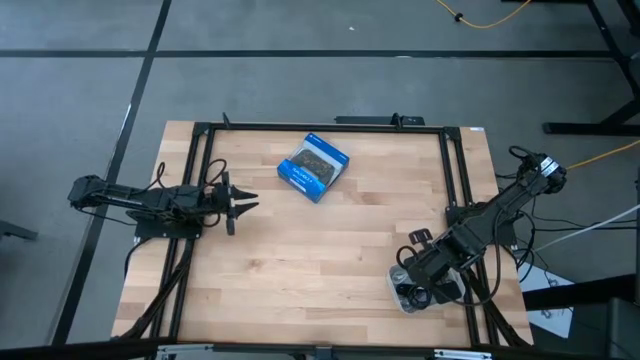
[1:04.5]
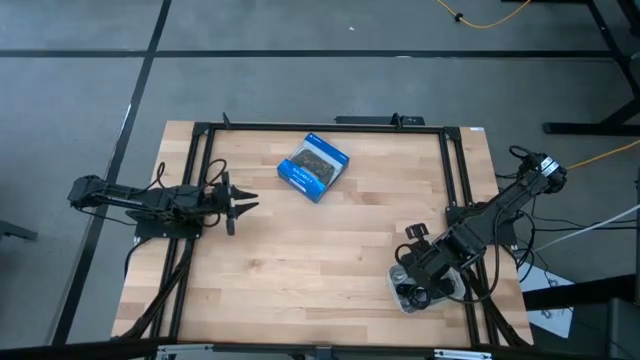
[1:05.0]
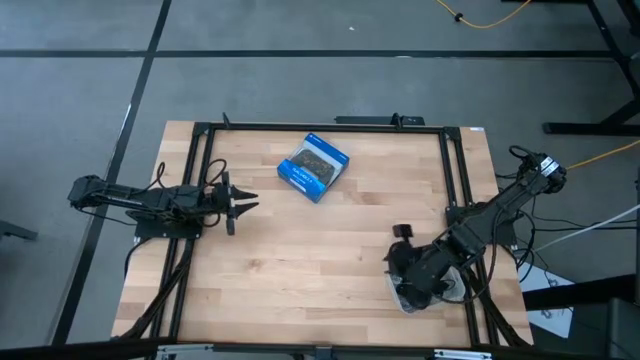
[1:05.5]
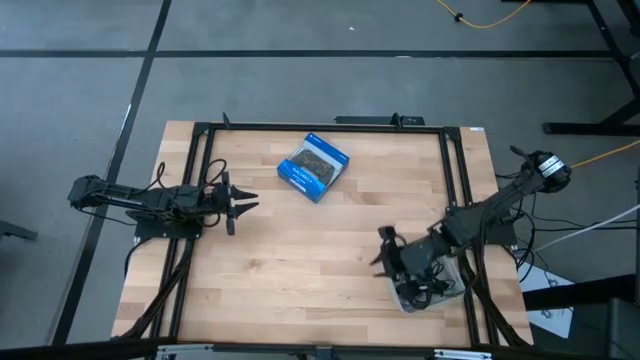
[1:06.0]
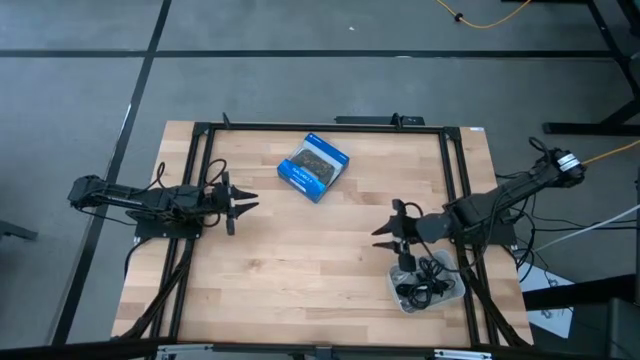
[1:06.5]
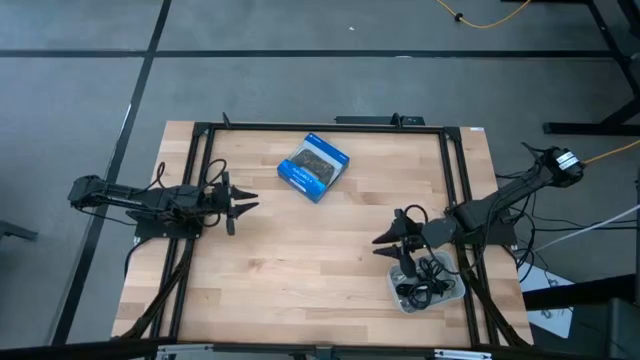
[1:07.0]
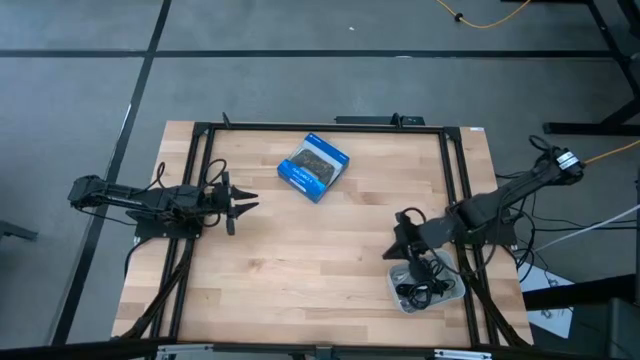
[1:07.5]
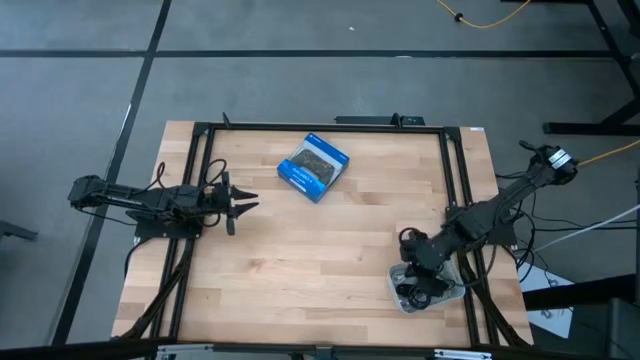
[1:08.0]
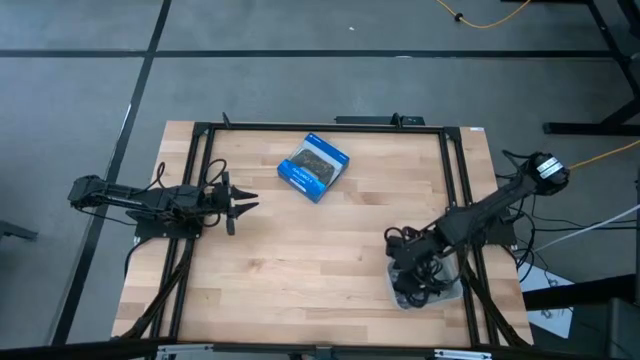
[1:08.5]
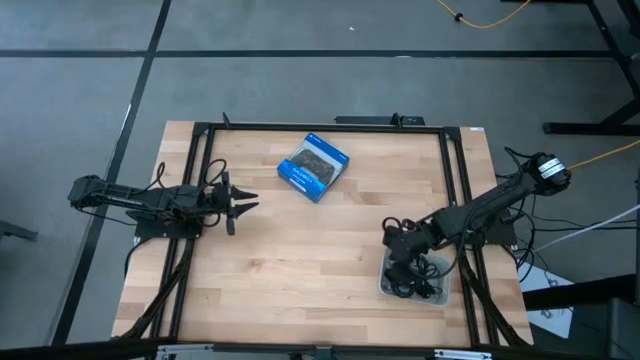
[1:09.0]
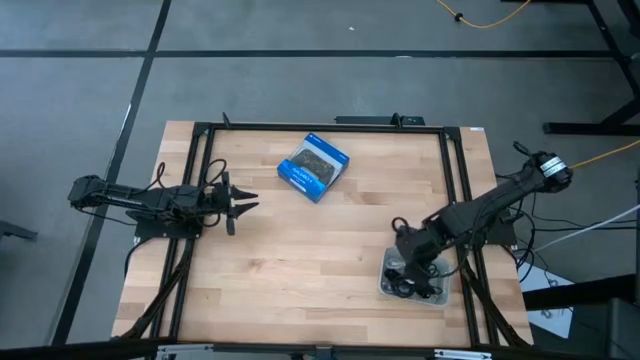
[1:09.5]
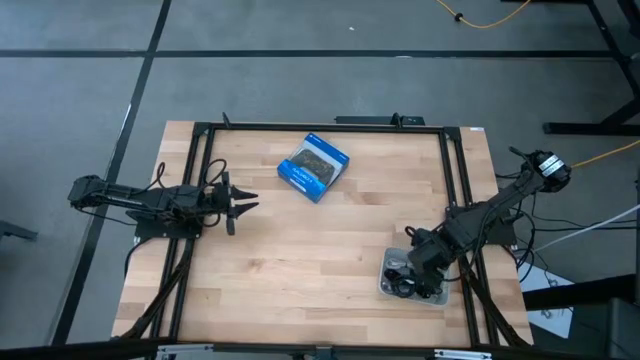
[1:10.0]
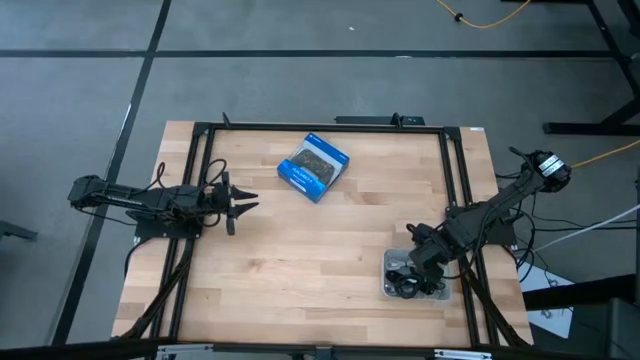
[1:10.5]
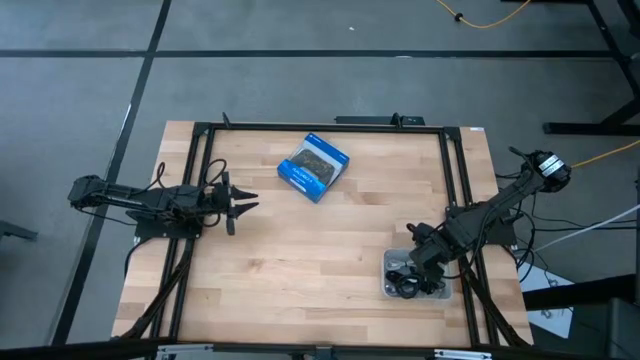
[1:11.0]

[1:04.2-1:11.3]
Task: Pick and place USB-C Cables
Adjust the gray bin

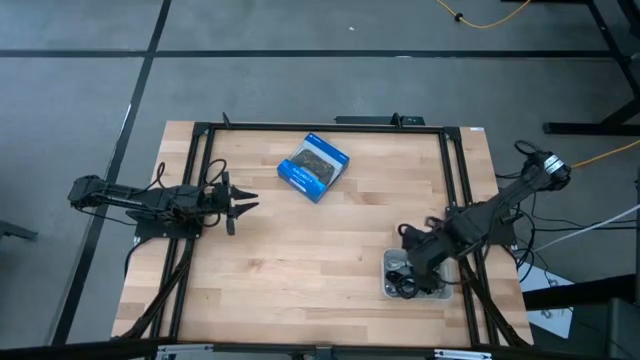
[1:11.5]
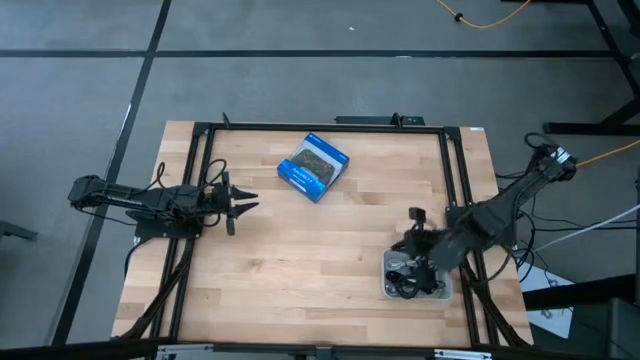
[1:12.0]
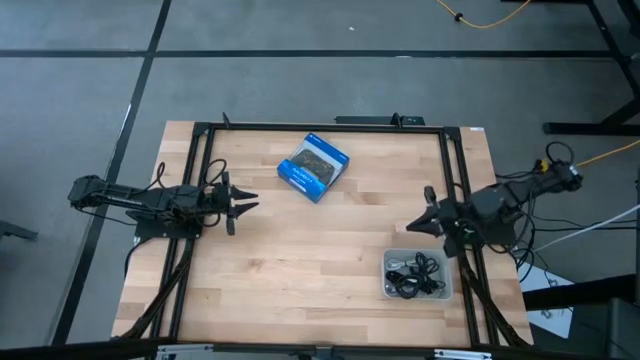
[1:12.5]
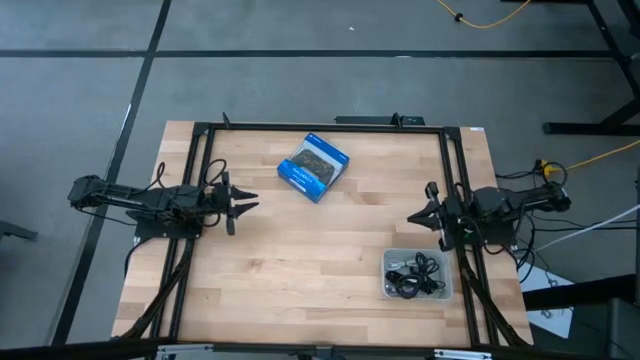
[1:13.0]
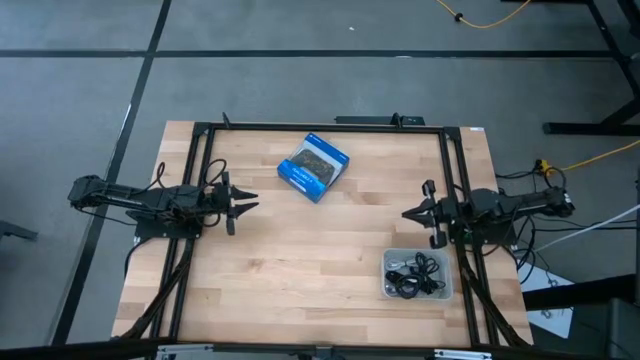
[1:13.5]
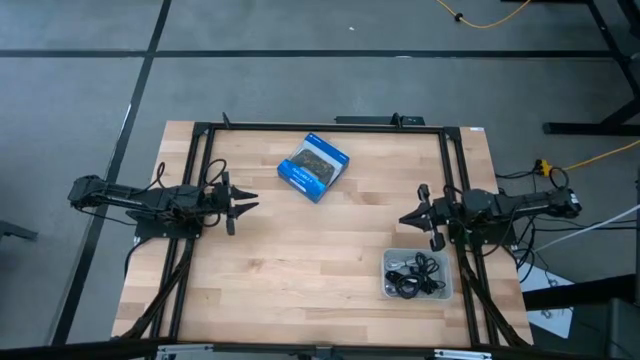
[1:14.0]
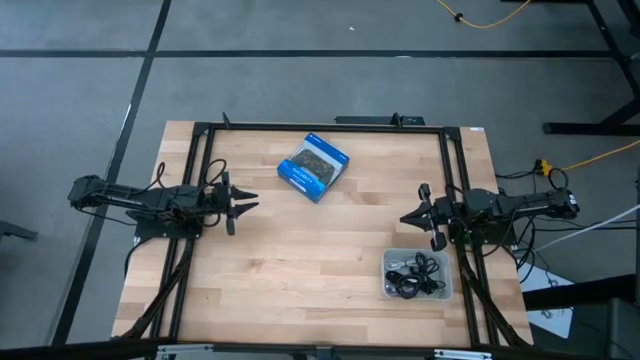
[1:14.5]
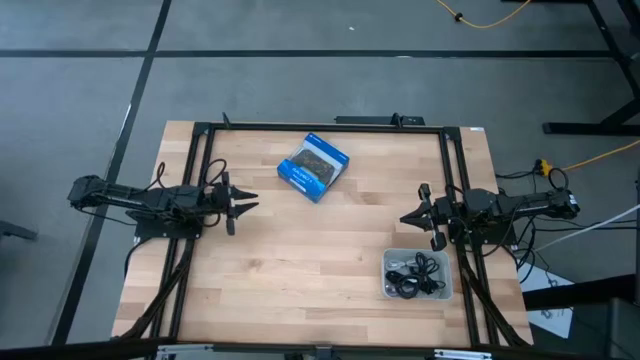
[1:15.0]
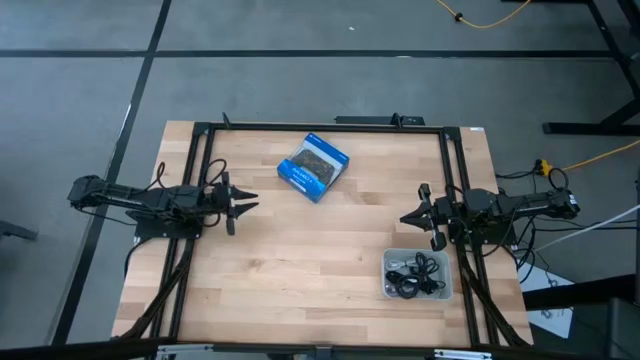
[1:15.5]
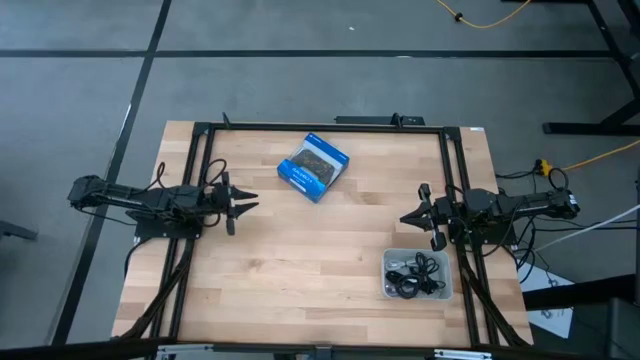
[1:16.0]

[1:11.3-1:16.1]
Return to Home Position

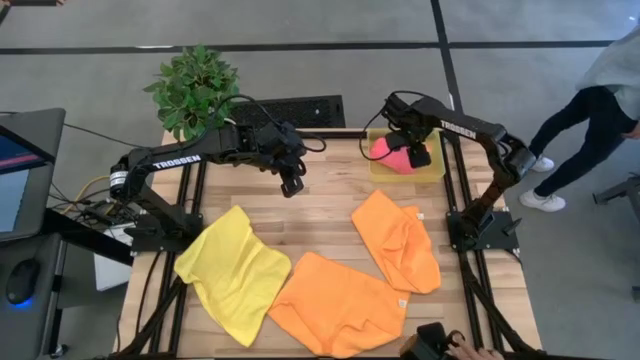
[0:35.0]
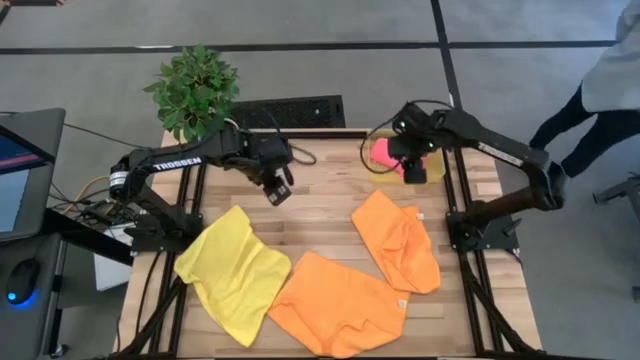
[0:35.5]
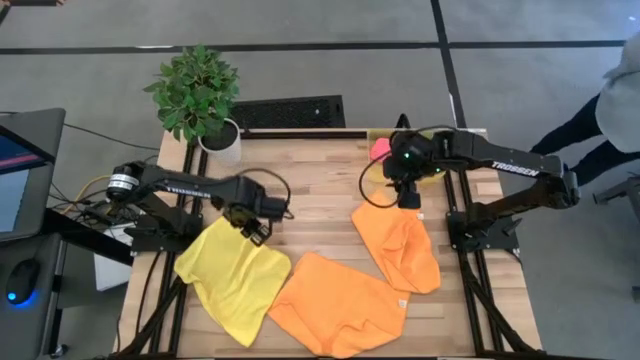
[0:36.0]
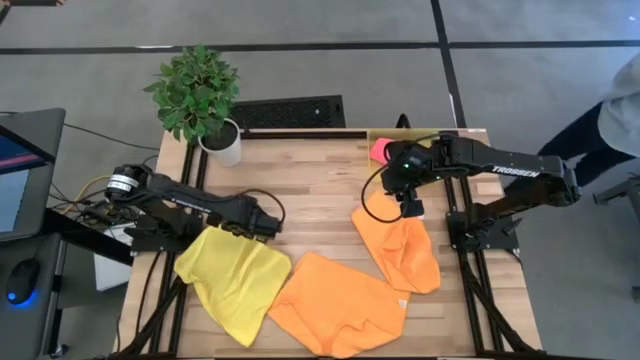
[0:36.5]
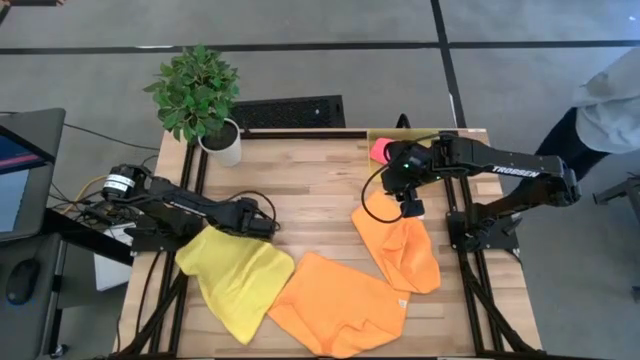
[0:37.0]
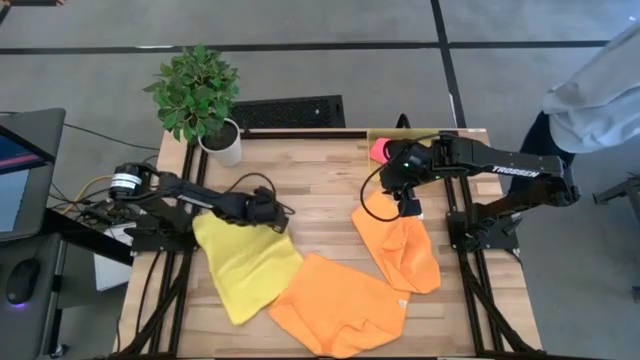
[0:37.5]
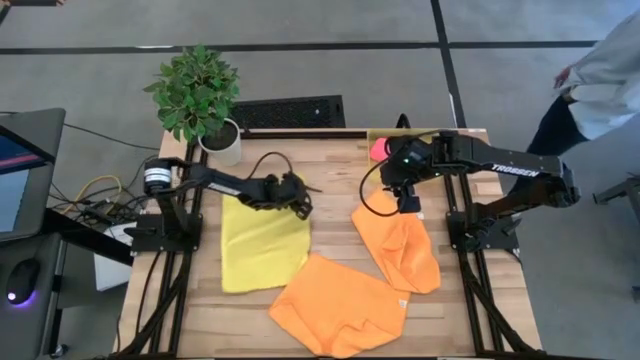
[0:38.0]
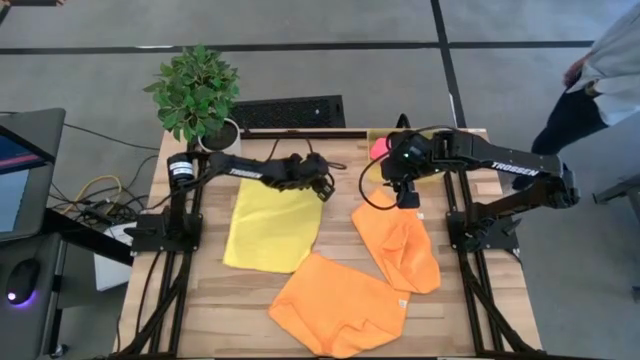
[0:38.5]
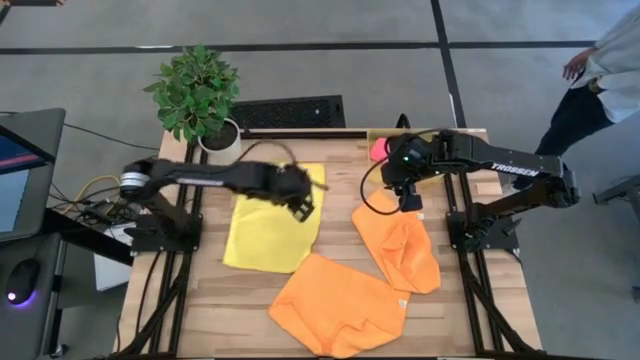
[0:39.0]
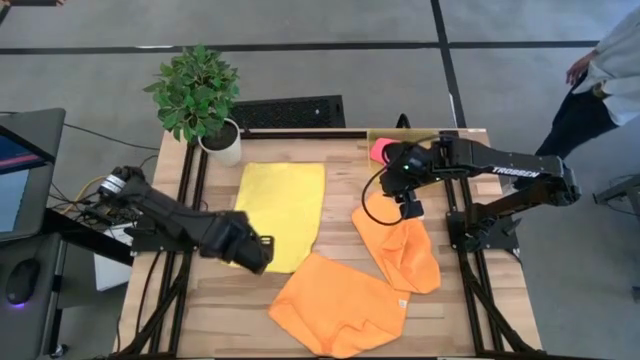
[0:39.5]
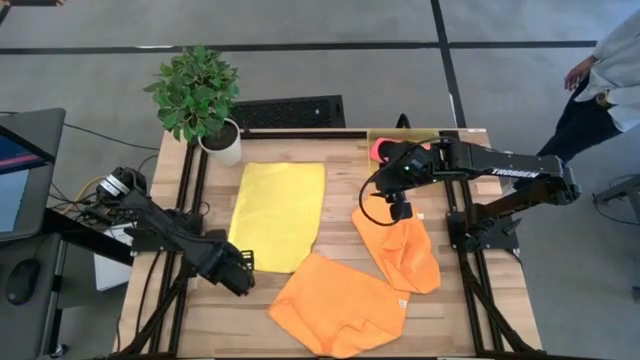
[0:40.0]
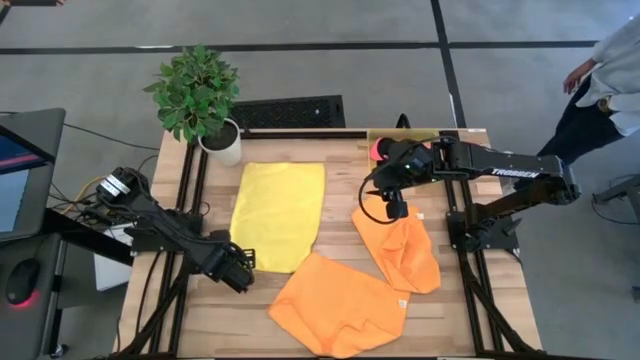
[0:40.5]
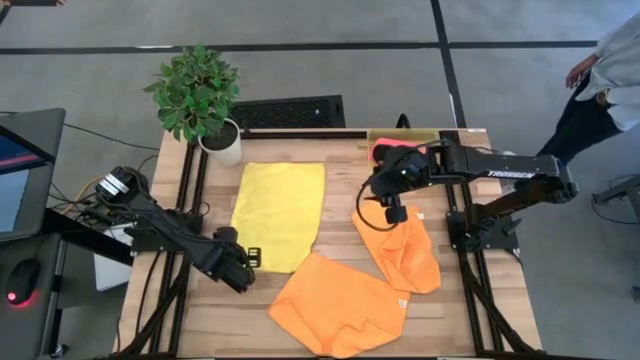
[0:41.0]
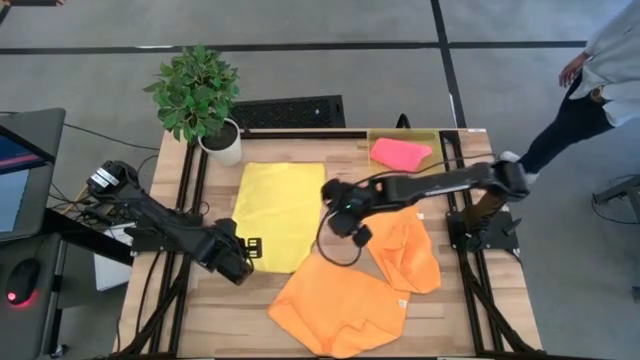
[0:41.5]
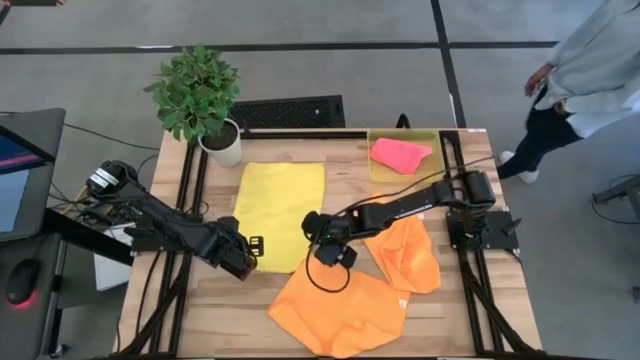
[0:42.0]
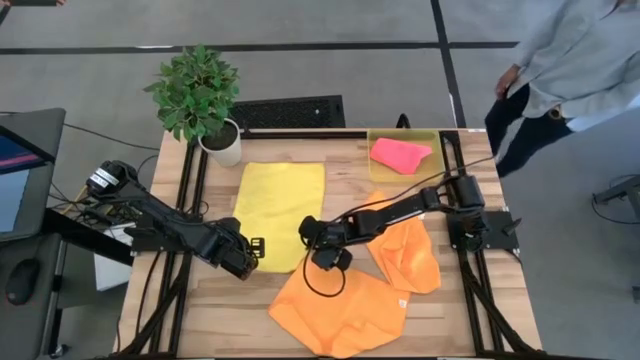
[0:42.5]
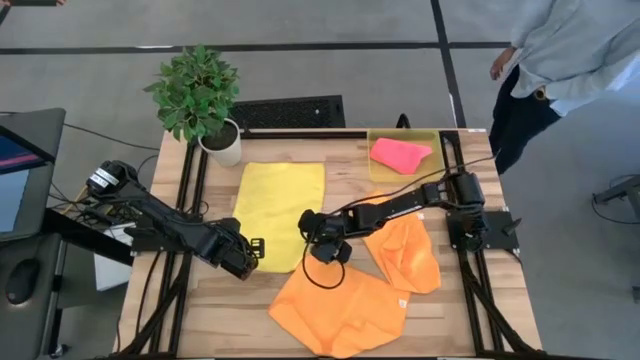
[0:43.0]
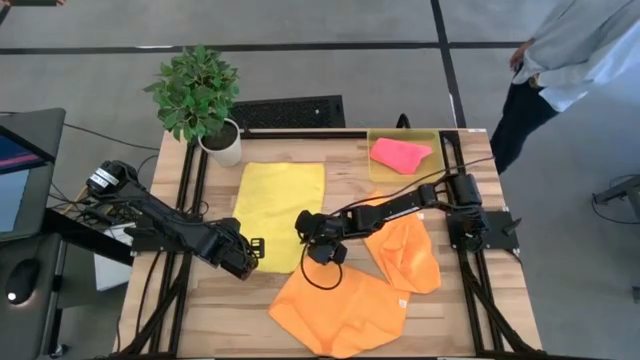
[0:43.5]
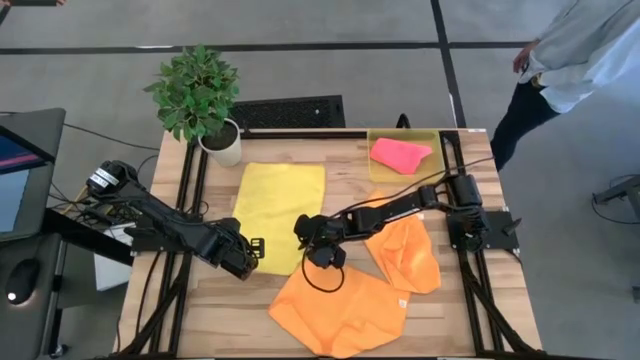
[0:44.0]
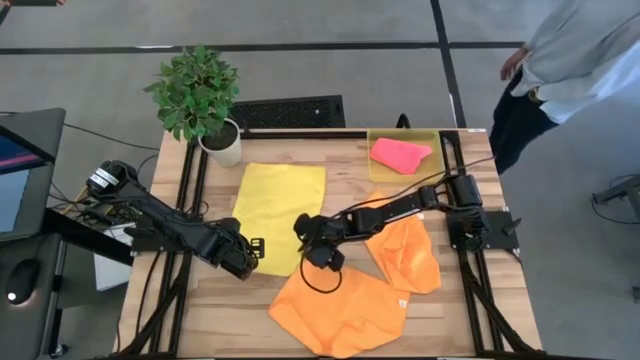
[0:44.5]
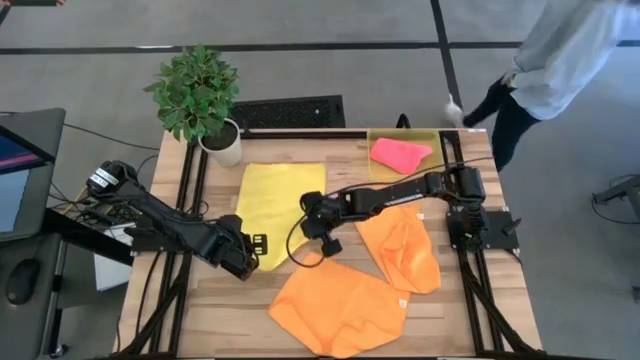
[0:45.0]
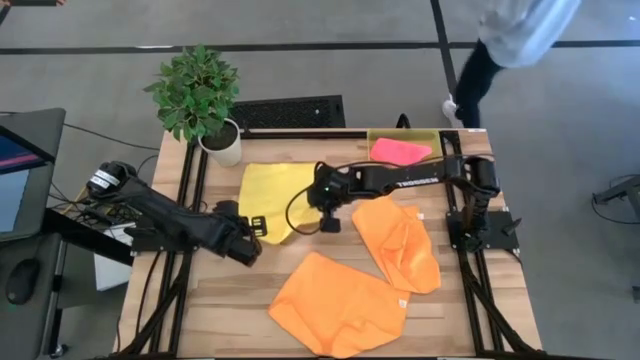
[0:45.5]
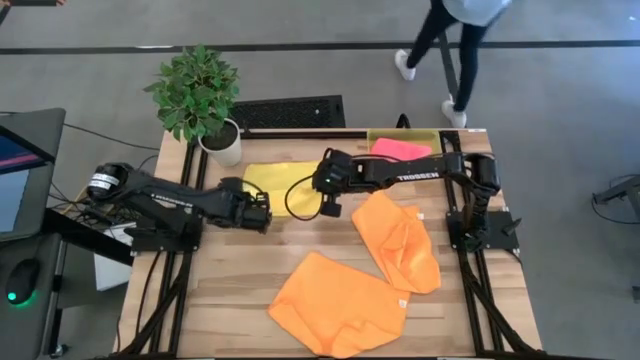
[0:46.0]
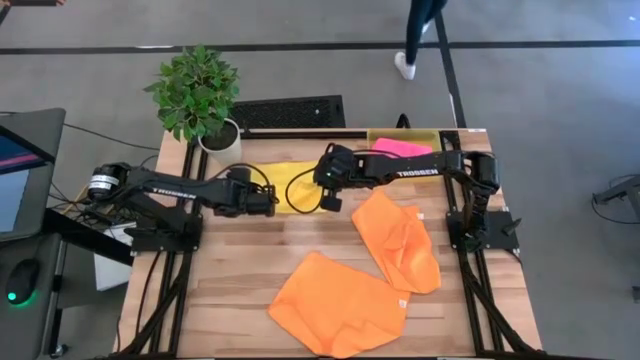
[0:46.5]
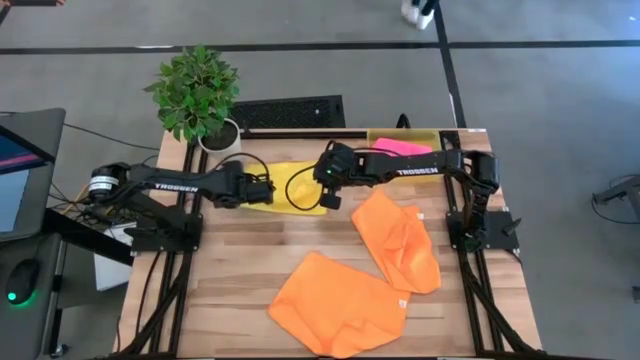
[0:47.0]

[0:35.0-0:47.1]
Task: Fold microfiber towels
Fold the yellow microfiber towel
